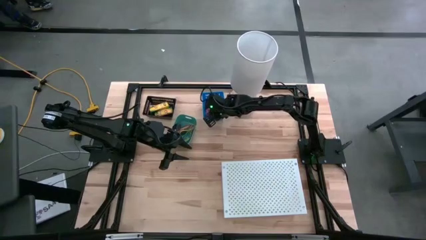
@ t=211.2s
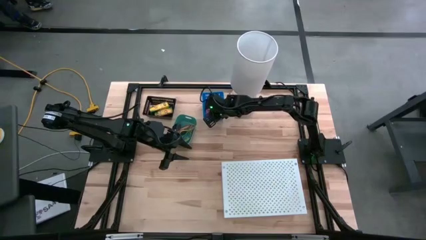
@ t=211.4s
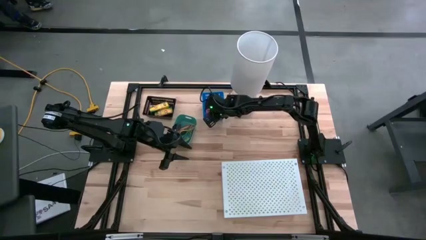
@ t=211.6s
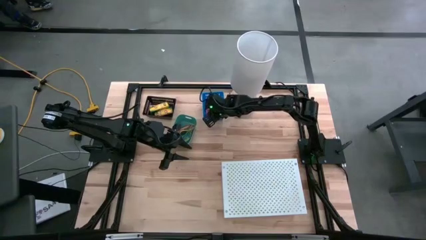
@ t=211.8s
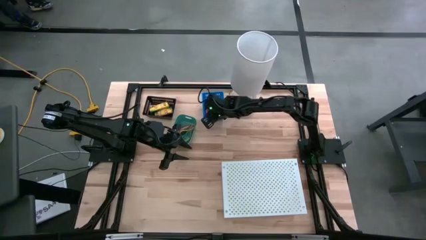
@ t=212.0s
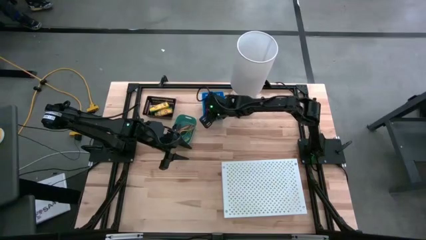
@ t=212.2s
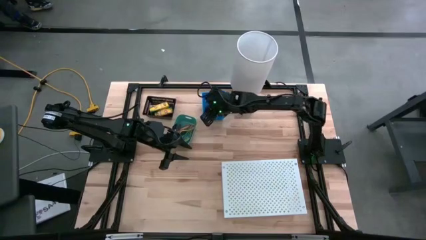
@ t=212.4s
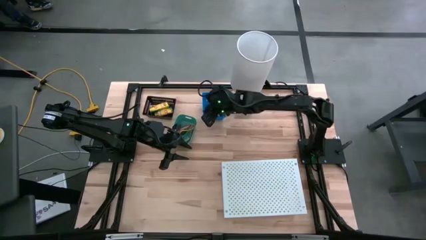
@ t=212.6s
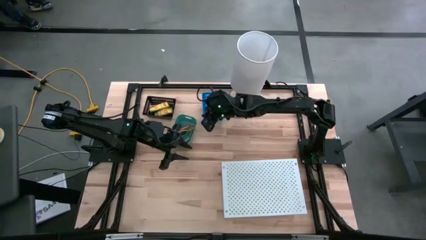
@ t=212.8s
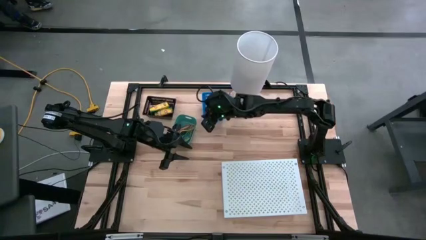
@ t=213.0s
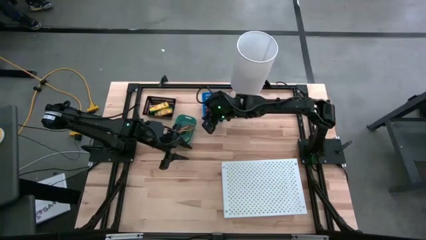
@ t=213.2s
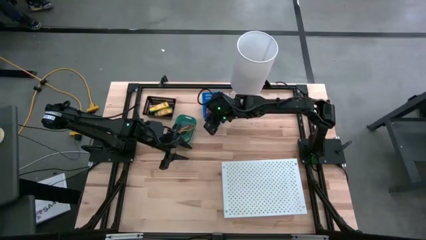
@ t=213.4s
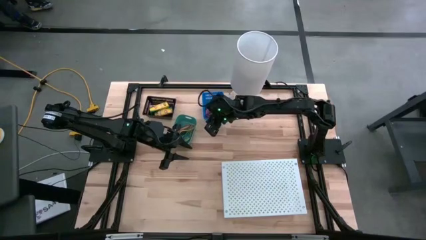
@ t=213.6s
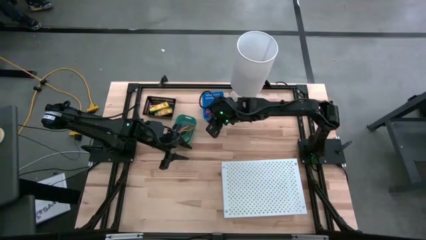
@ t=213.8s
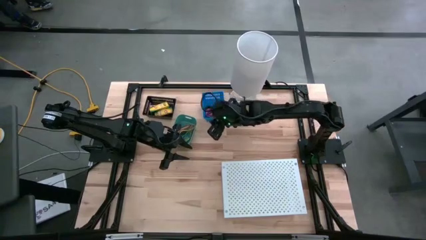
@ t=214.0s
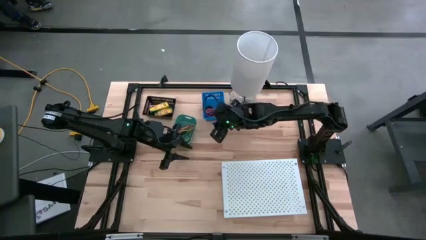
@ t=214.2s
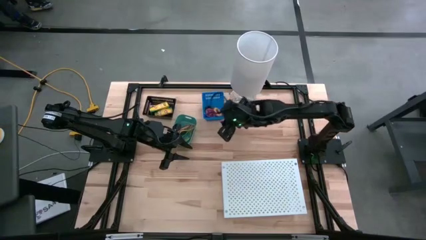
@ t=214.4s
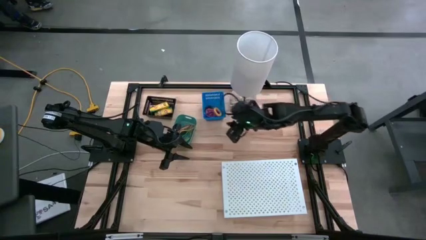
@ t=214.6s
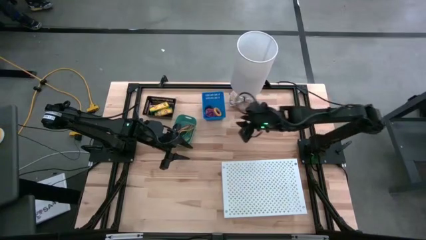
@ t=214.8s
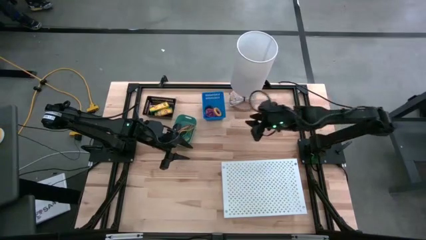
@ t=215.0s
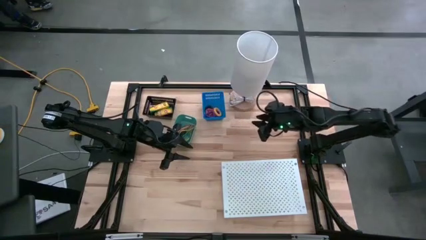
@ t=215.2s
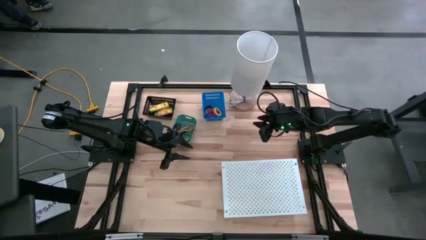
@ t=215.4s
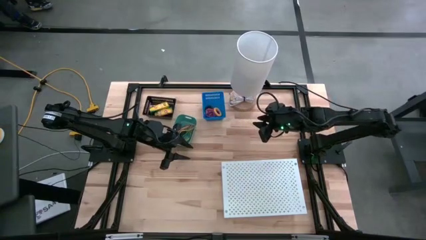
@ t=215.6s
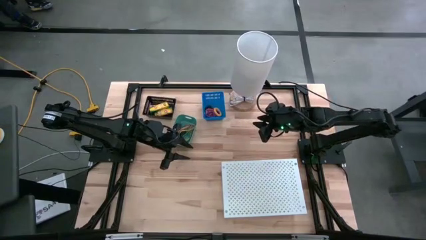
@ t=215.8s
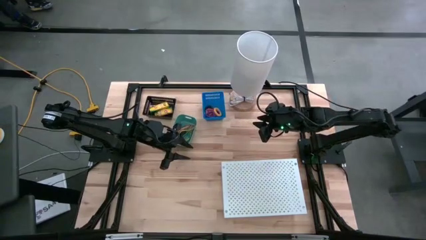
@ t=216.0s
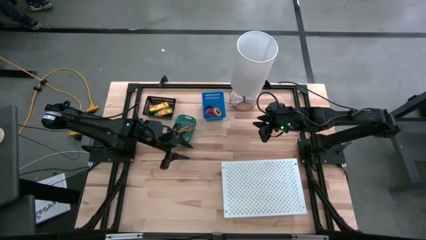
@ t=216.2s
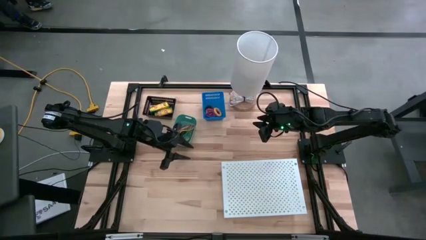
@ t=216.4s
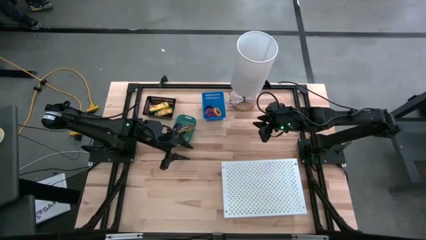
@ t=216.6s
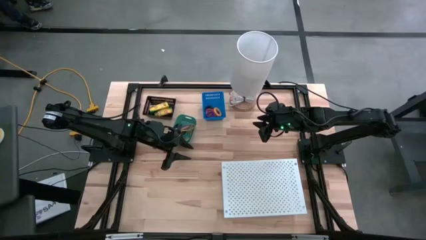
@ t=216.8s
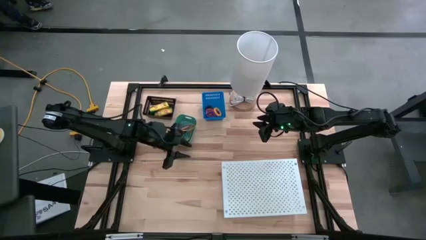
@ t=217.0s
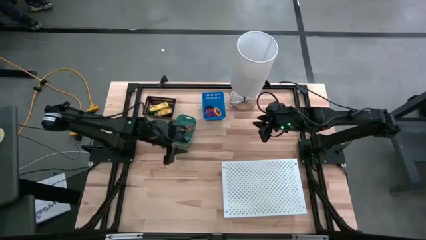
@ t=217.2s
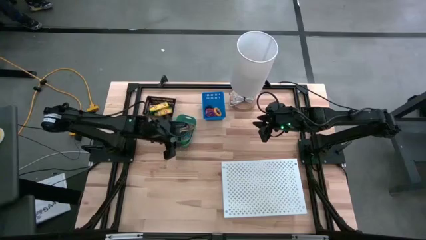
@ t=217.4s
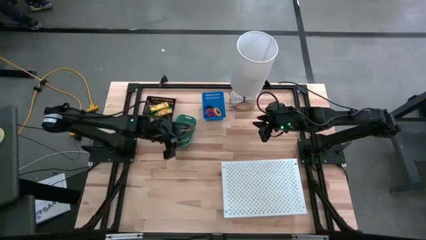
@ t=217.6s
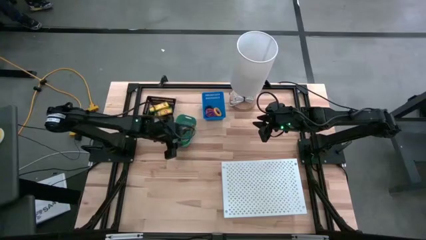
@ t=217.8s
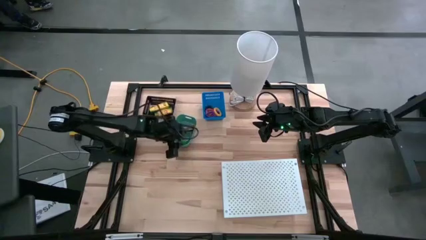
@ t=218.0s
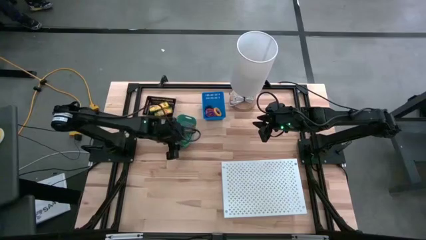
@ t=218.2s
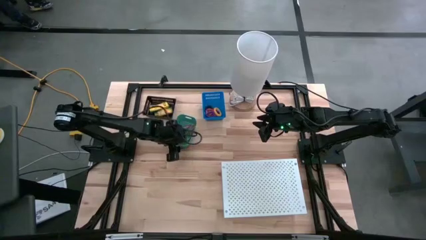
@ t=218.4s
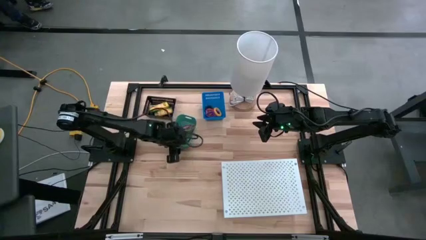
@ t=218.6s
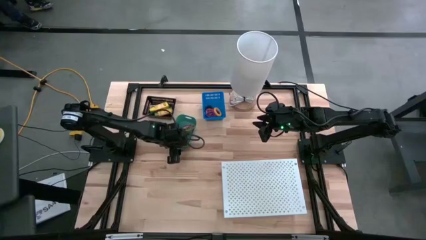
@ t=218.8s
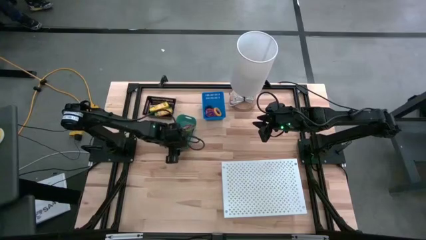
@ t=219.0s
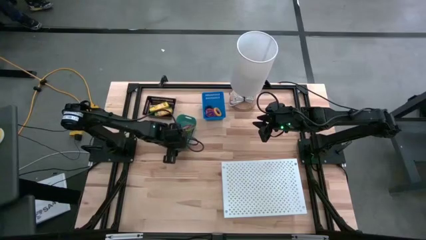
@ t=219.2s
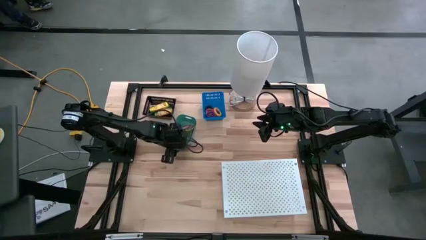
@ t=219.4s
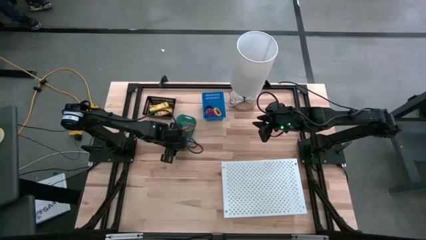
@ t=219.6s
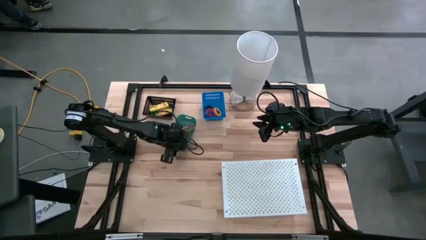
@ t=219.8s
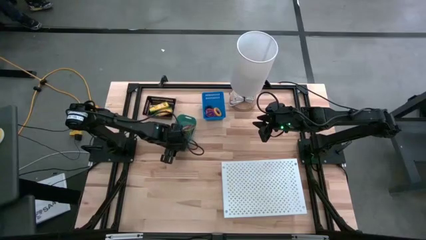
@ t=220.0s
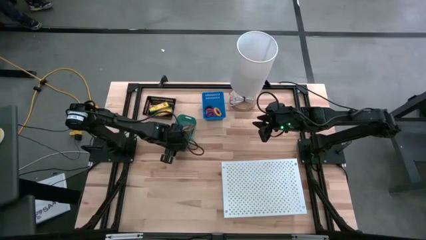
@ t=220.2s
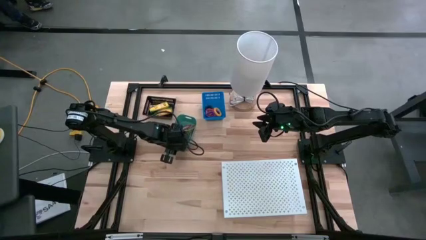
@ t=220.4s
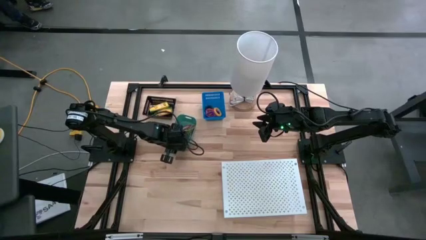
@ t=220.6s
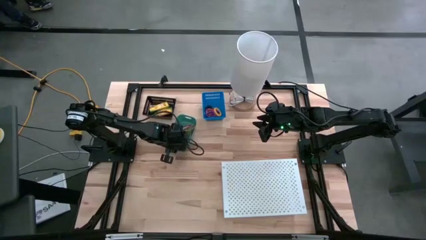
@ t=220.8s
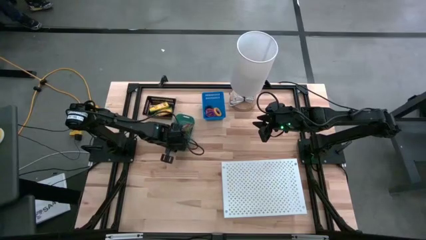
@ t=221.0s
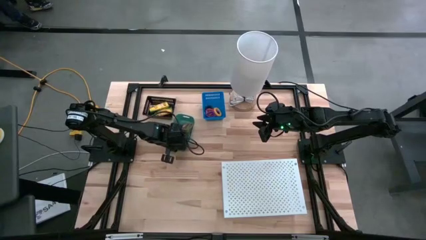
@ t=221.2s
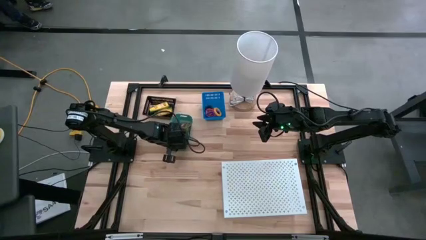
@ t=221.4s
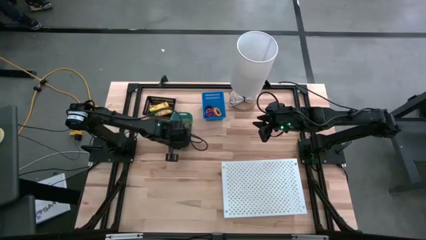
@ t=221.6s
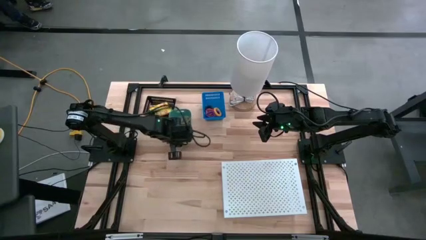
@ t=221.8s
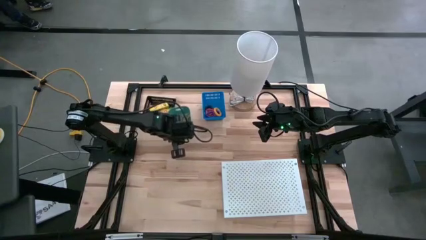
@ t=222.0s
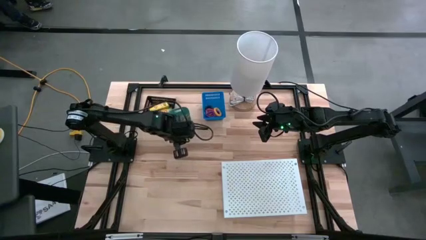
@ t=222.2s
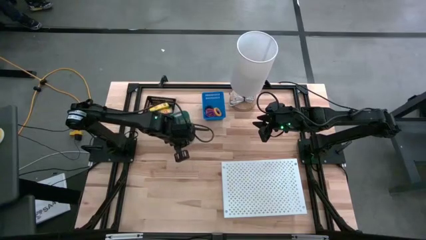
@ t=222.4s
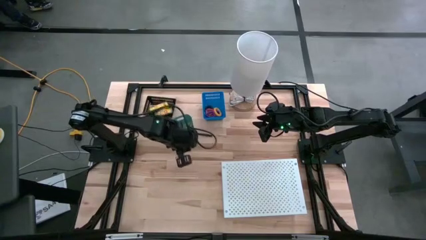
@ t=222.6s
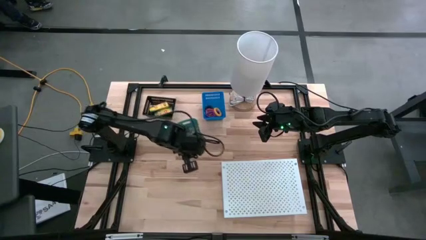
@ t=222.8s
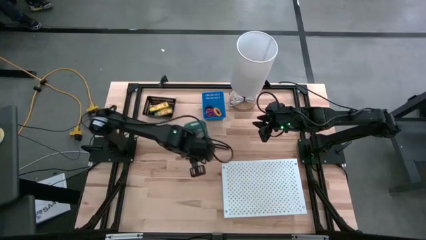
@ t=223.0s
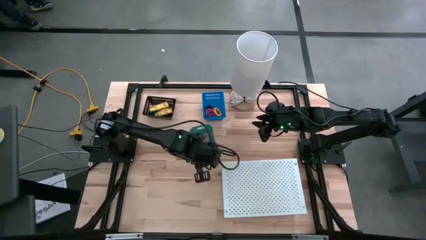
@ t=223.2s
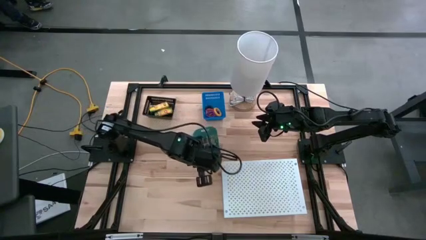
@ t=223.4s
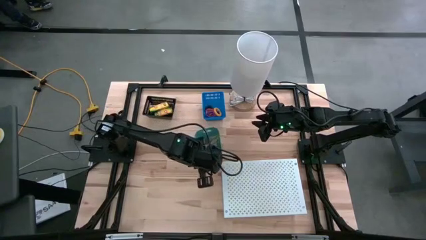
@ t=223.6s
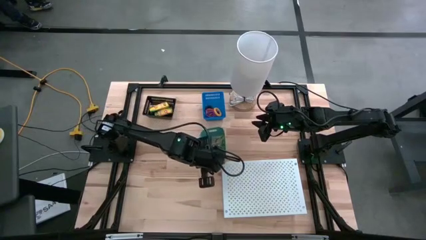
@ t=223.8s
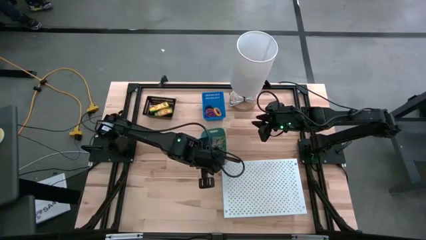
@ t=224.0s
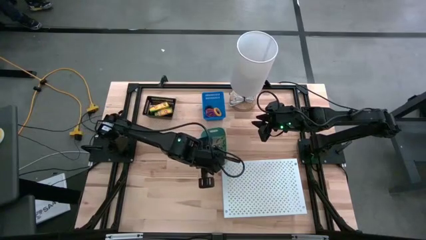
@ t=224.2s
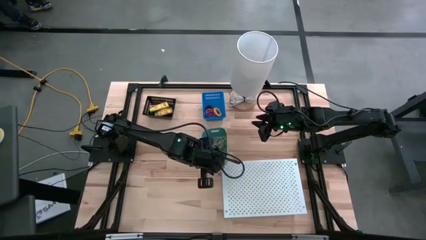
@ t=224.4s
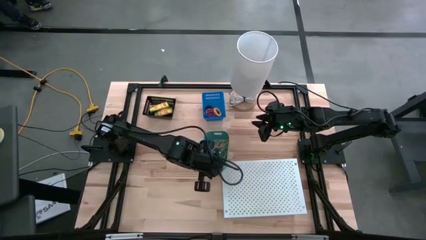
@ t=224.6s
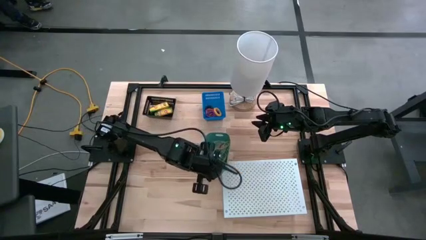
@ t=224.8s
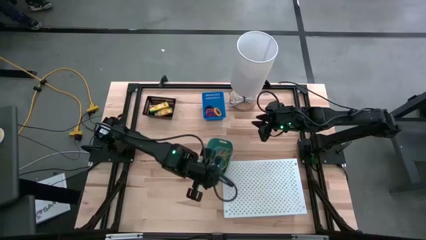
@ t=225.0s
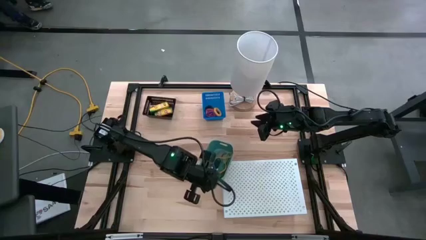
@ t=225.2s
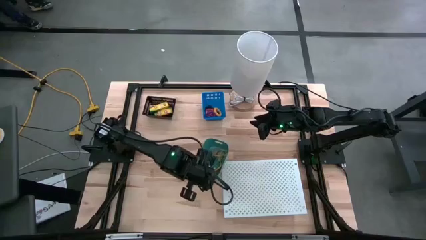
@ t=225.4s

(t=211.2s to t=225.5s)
Task: Pick & Place Office Desk Supplies
Put the green bin with the rubber bands on the shelf

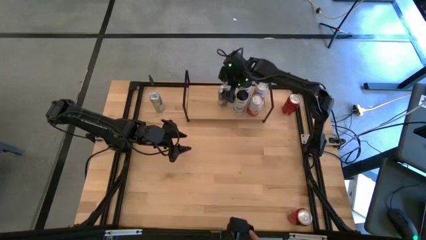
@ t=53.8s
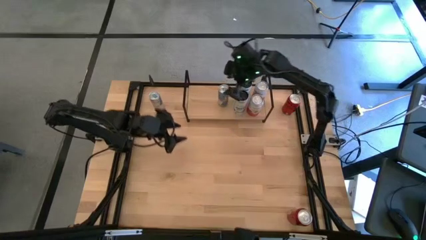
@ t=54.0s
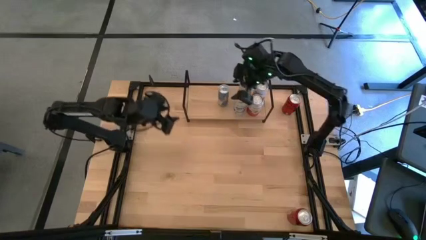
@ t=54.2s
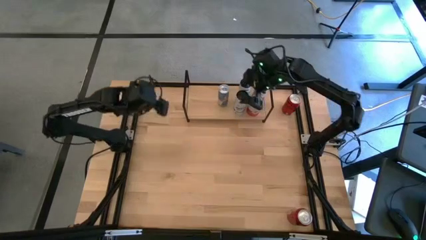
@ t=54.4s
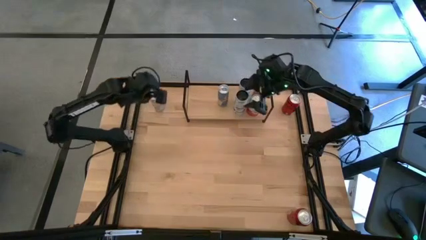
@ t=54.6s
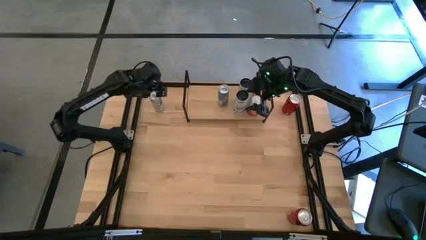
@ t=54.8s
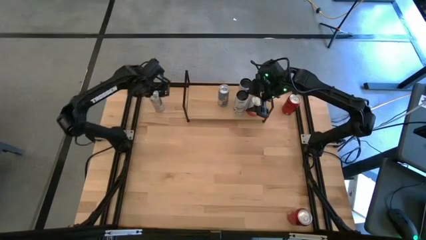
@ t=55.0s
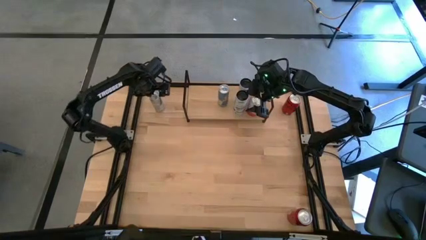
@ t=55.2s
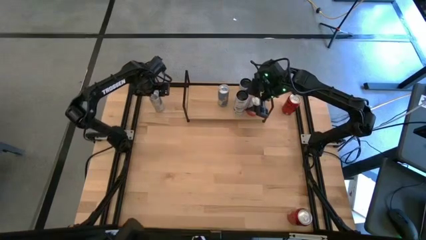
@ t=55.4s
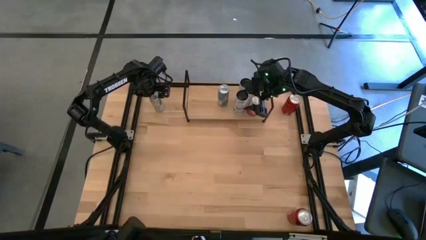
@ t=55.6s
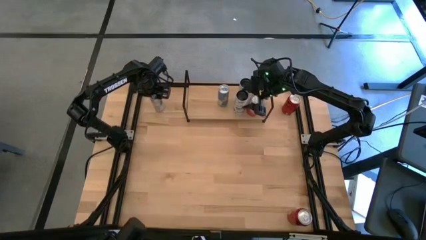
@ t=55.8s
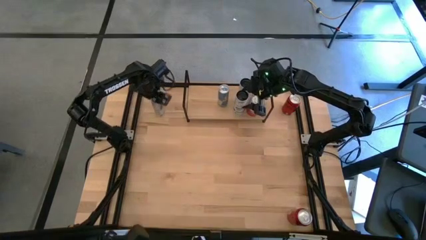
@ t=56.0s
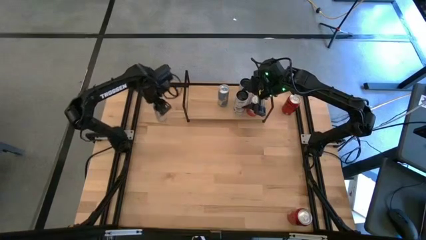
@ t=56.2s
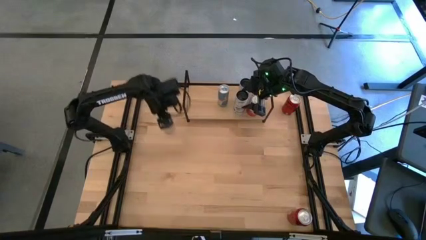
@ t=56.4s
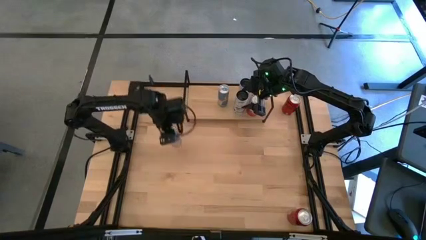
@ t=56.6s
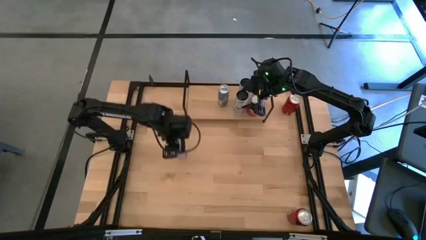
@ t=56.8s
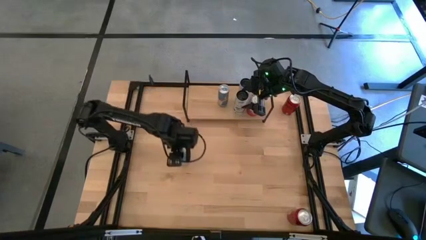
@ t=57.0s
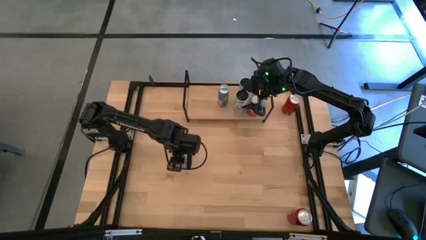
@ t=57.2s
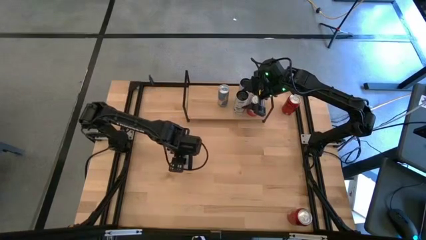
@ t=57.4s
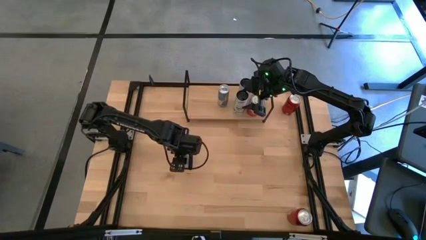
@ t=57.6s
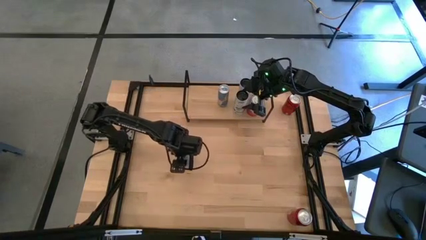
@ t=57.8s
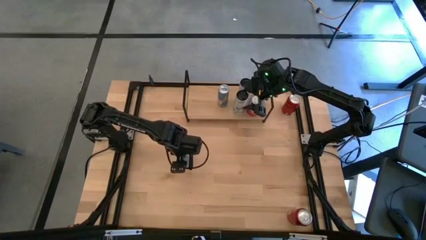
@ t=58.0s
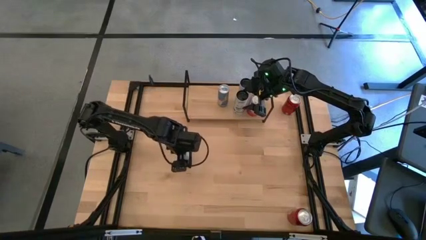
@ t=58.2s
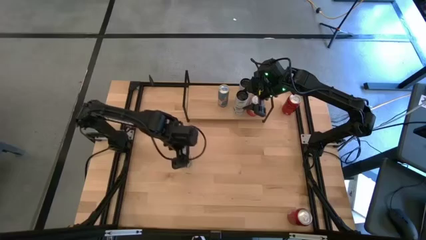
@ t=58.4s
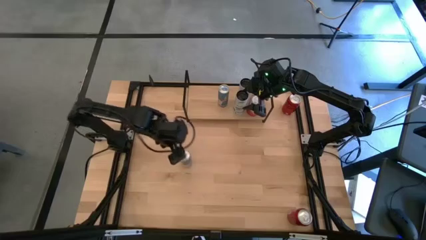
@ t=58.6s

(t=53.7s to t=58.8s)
Task: Place canned beverage on shelf
Move the blue soda can to the center of the table
